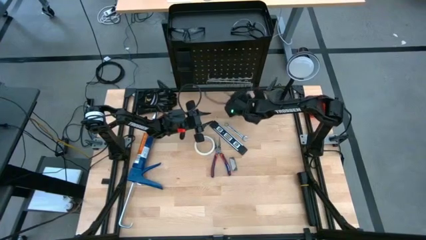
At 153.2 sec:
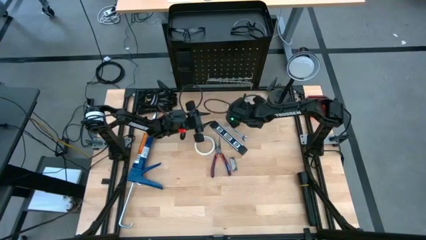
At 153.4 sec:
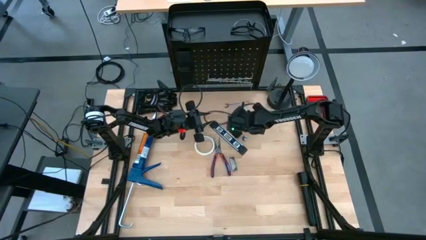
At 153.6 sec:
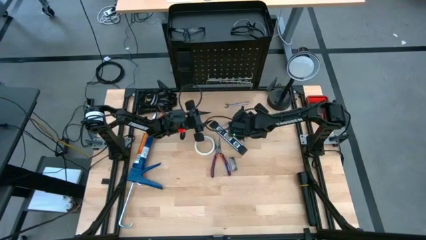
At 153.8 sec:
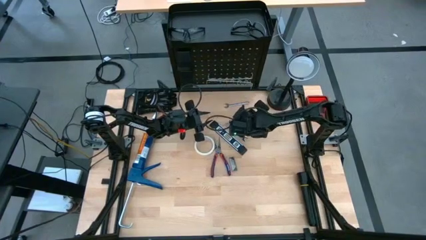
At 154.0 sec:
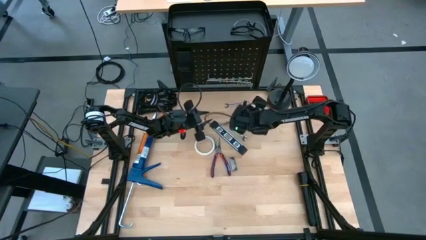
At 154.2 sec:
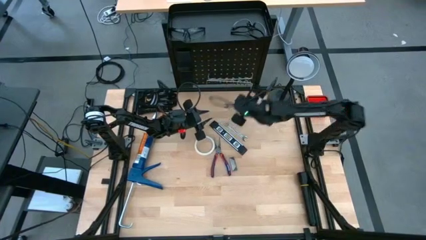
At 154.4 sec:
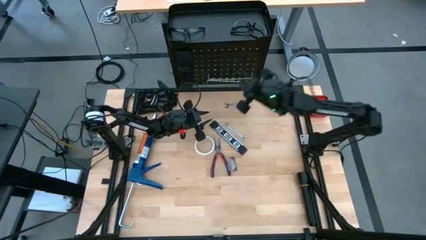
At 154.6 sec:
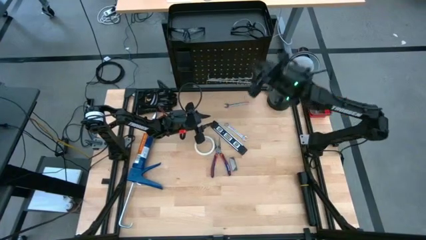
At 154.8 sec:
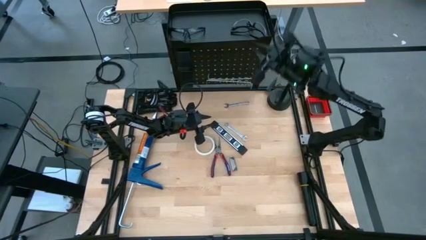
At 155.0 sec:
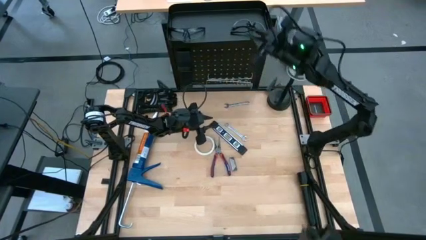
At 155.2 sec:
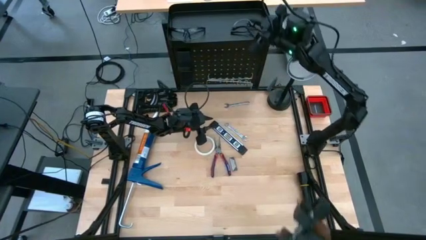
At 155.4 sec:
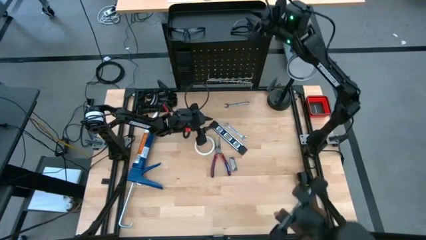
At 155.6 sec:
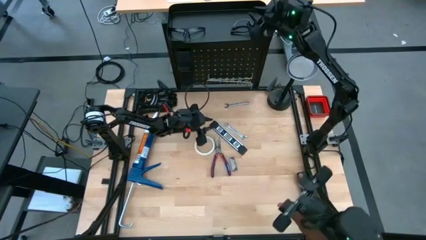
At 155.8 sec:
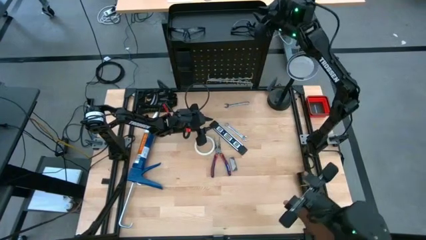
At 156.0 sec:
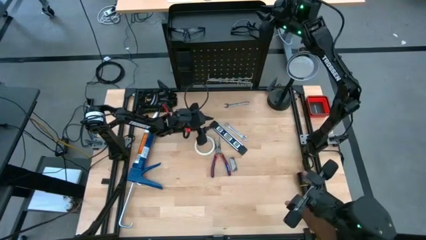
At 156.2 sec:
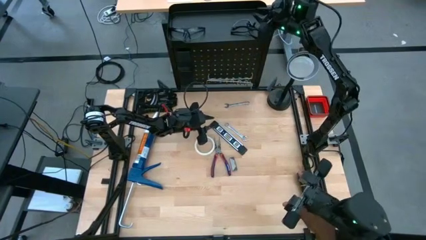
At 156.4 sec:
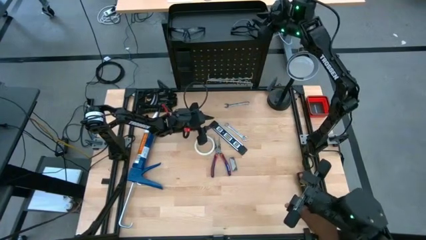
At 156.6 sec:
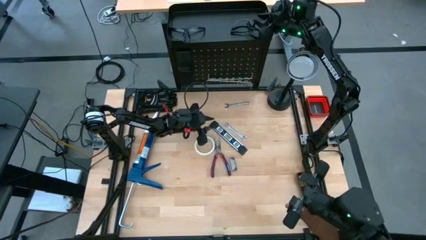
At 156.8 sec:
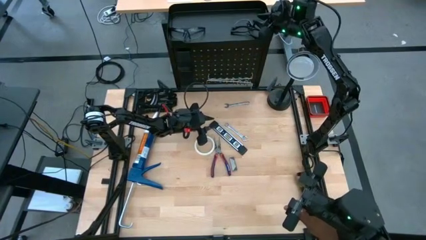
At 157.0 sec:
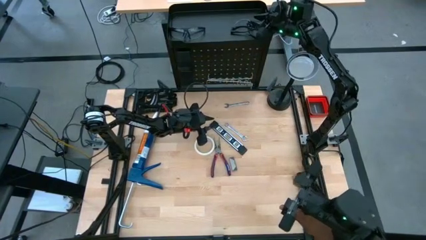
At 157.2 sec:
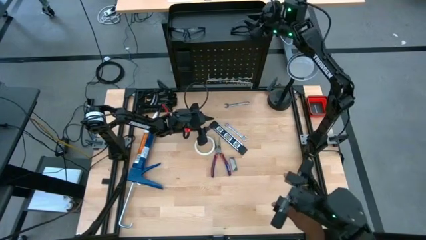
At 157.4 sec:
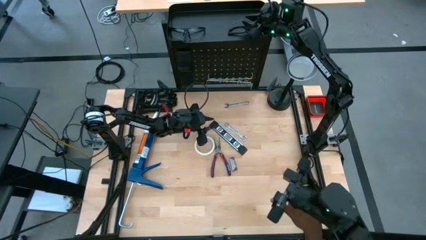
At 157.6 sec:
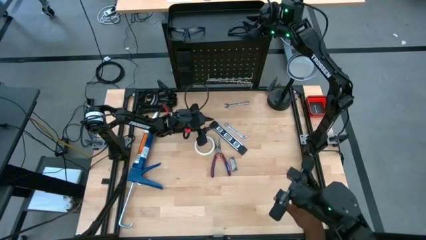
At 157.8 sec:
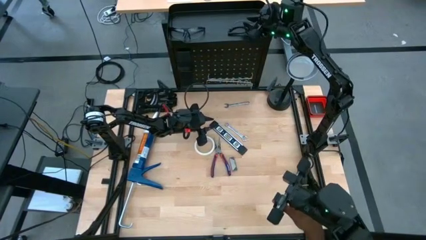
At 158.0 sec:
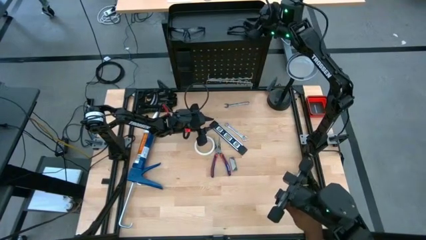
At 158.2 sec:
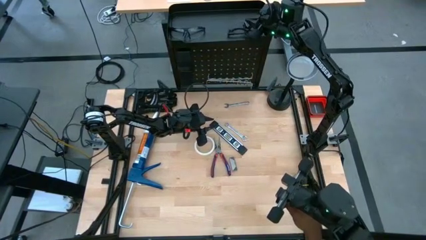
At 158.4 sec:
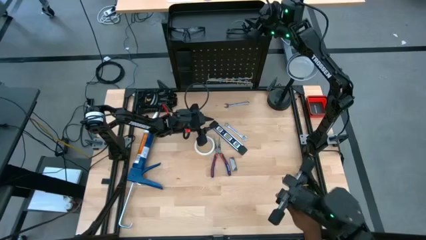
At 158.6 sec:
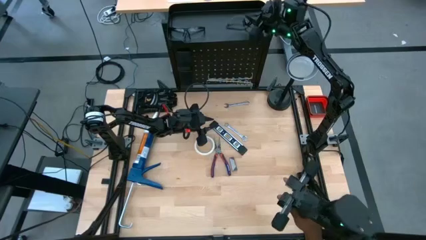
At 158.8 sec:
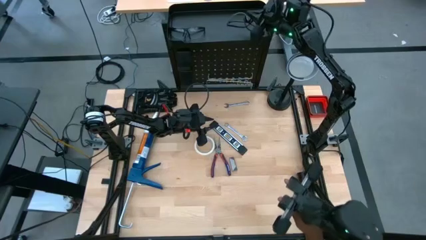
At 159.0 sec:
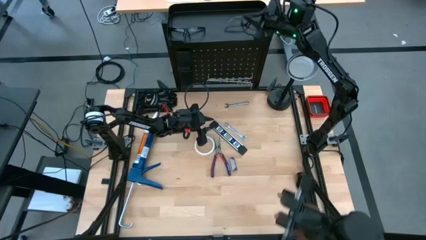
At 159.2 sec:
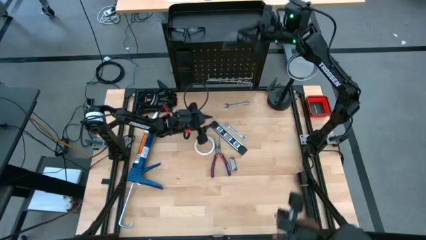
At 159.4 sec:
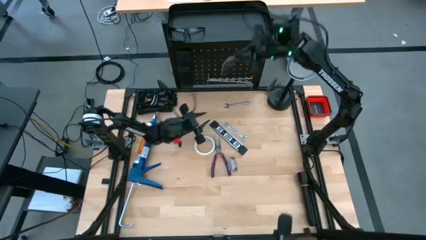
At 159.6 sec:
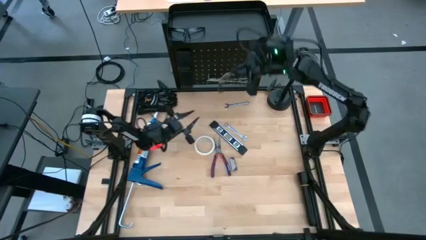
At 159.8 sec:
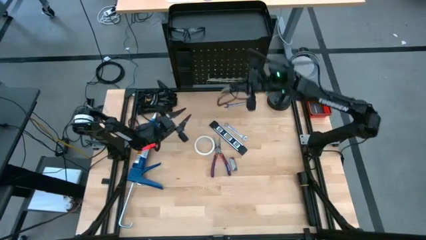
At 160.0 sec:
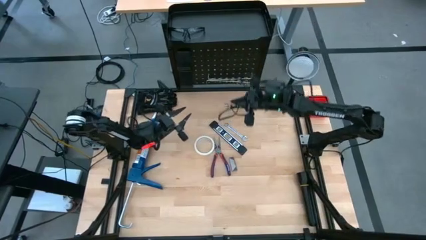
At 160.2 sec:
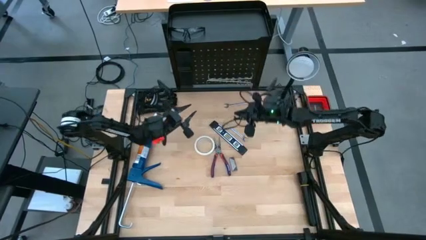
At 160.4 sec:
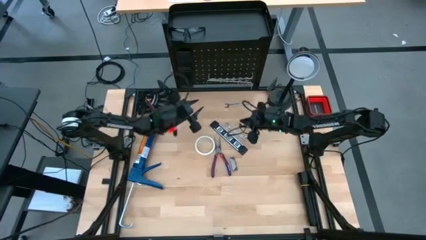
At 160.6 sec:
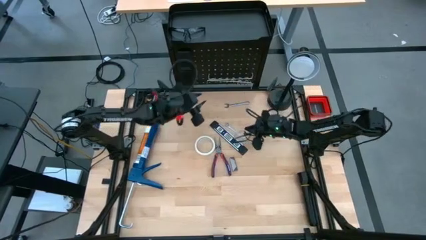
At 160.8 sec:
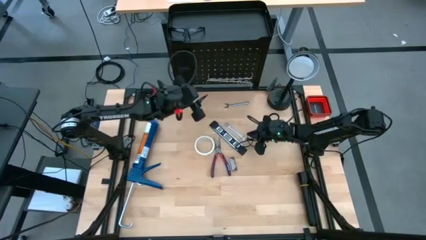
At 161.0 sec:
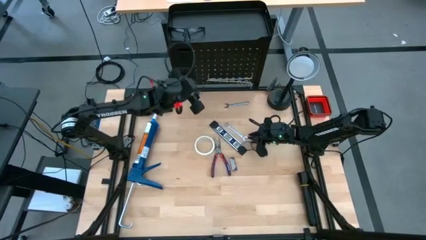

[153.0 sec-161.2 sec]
Task: Hang tools onto peg board
Remove the right black safety glasses from the black peg board

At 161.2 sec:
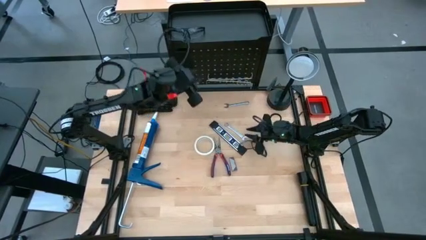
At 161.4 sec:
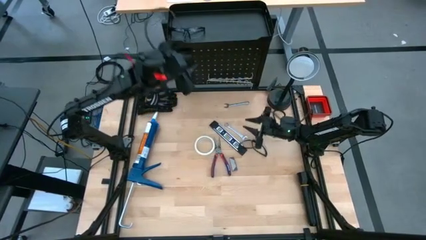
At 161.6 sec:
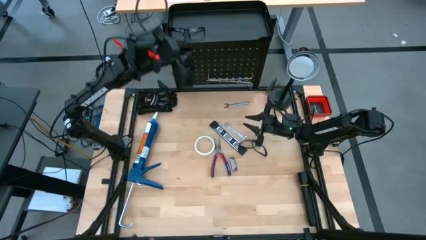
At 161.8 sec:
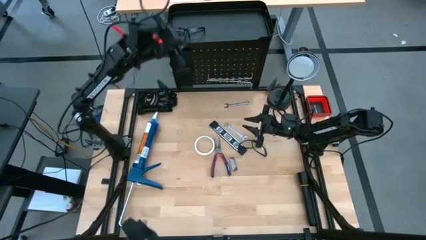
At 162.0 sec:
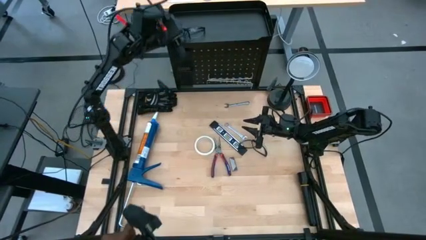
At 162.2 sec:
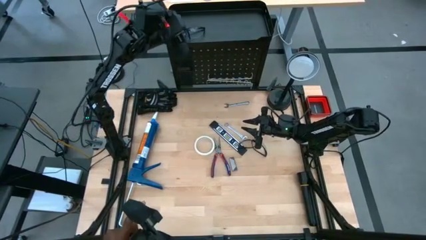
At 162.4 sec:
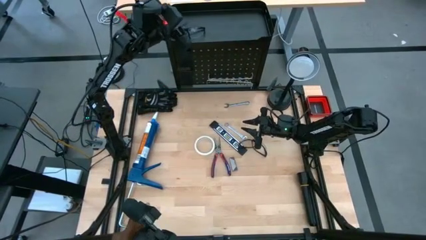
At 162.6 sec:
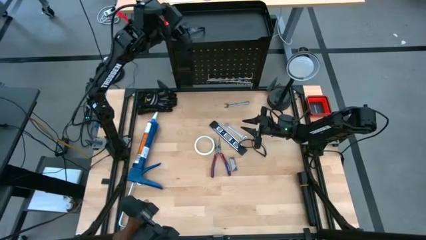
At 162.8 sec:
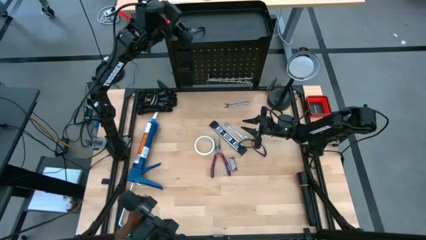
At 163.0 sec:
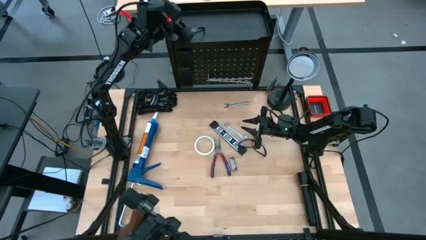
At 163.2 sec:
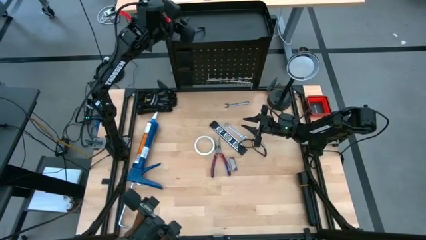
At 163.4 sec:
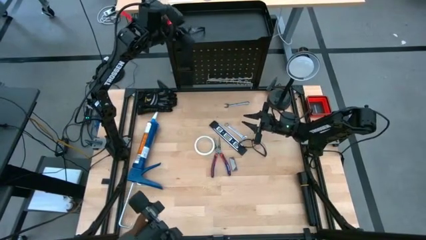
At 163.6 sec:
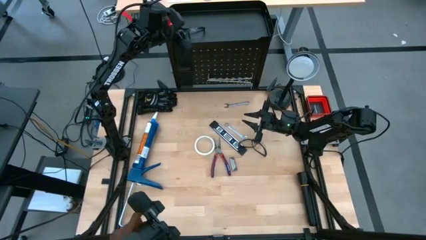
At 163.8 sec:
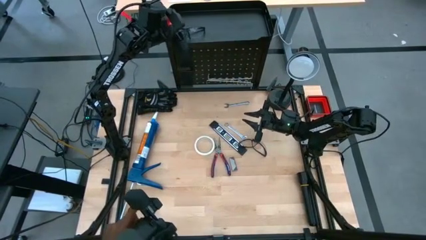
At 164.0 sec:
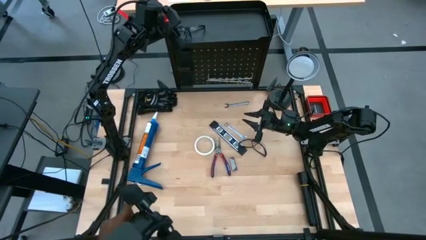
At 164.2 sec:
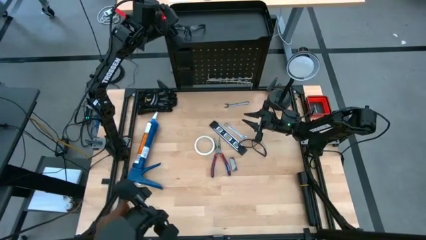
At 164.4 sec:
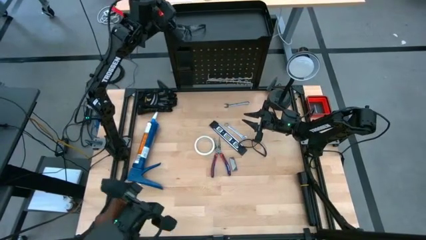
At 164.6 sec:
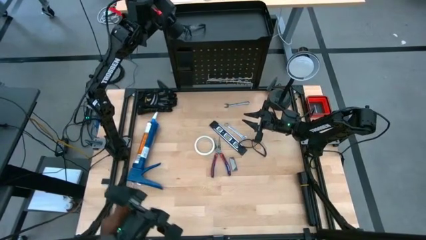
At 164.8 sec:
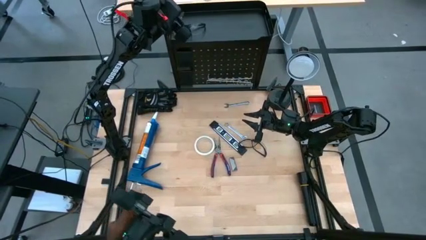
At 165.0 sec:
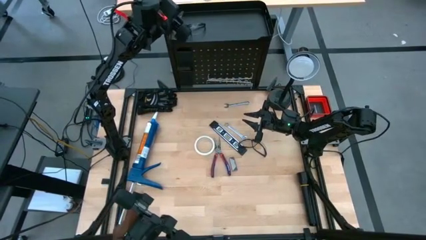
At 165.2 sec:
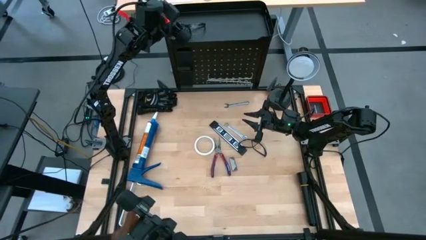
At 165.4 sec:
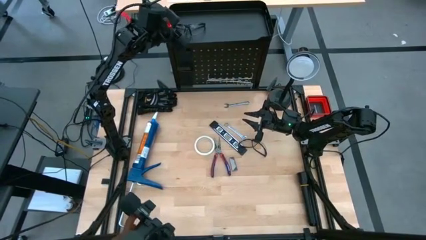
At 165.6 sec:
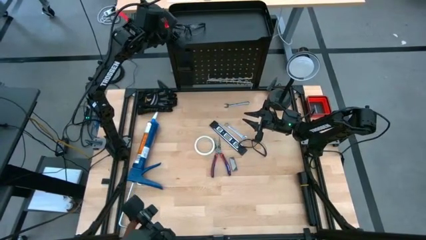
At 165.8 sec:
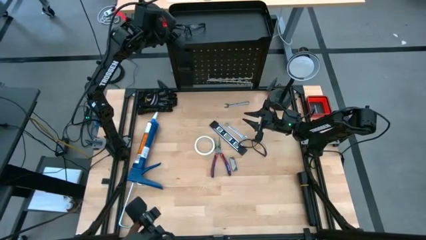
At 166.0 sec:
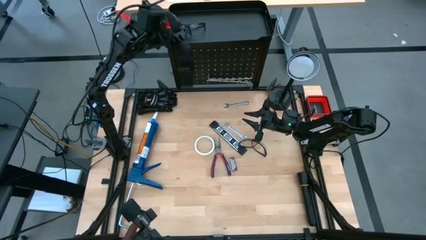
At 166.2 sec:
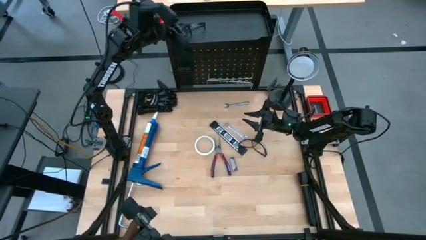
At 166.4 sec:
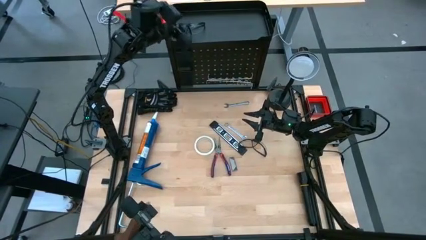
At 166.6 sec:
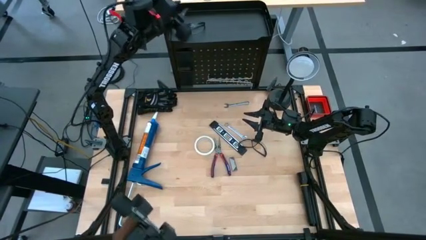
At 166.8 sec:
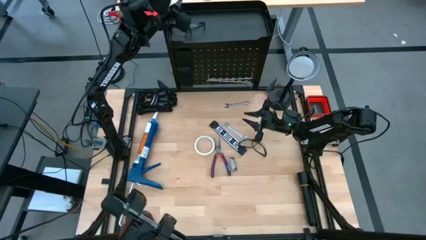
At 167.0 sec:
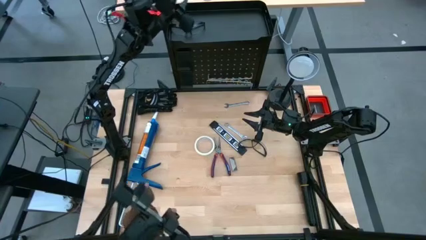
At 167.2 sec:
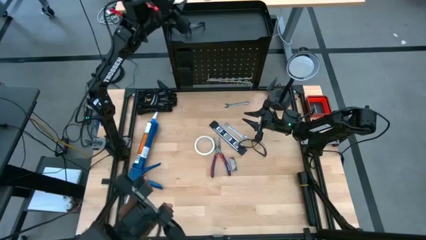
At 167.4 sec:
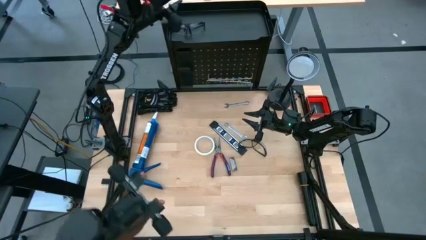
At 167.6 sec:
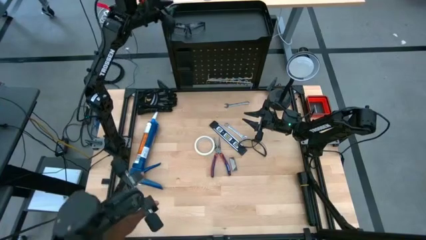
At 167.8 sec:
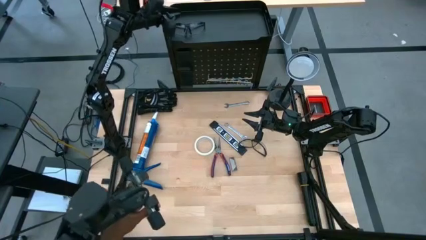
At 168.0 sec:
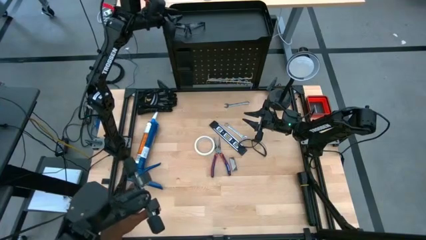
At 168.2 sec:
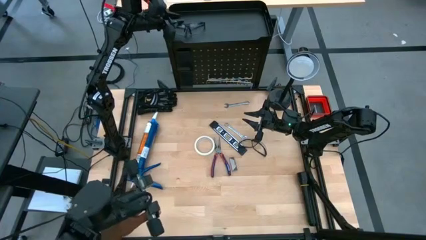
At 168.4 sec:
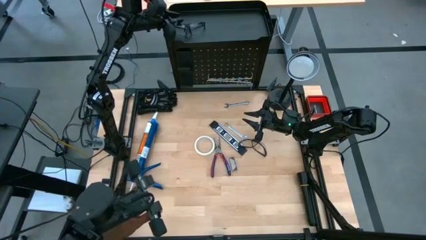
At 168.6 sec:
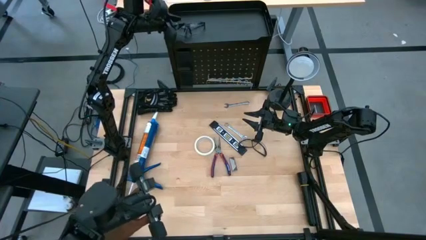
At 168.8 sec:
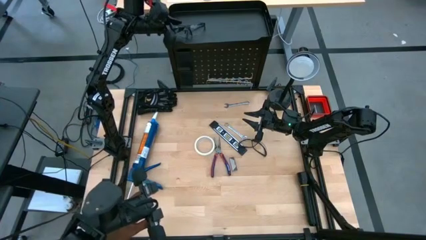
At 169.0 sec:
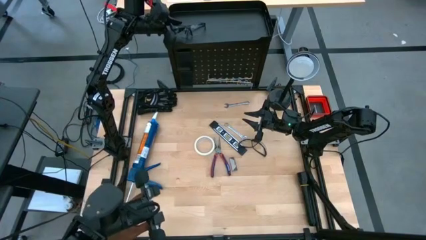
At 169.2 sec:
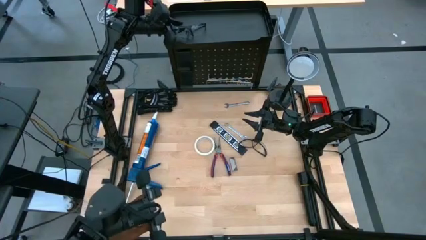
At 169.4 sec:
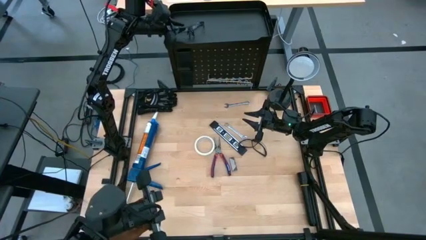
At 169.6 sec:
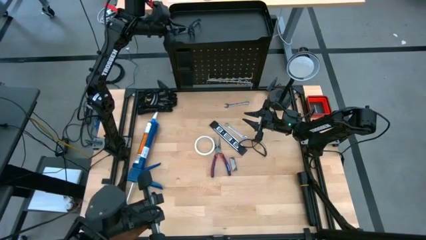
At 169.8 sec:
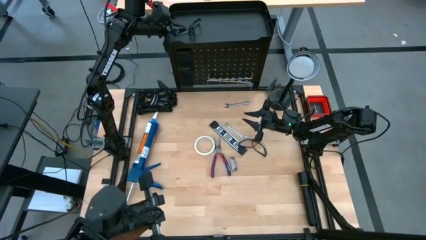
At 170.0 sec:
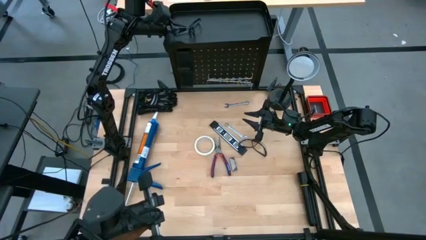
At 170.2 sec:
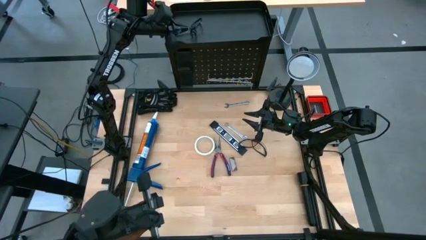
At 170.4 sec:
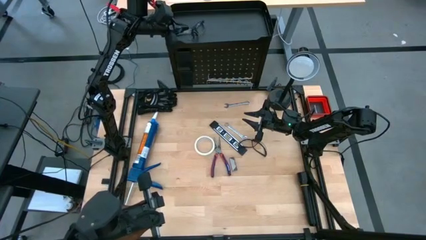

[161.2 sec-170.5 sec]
Remove the black safety glasses from the black peg board
